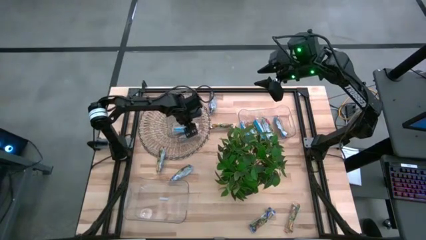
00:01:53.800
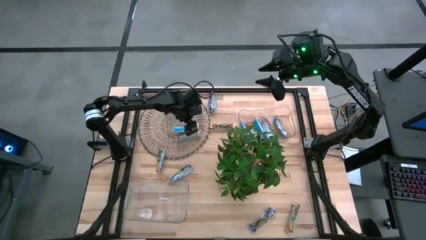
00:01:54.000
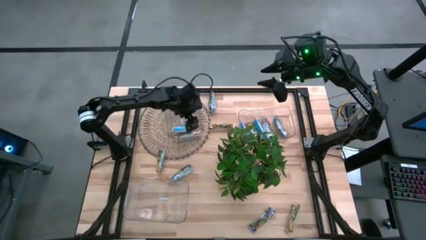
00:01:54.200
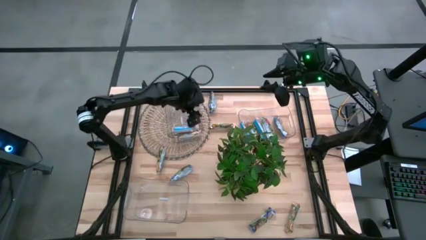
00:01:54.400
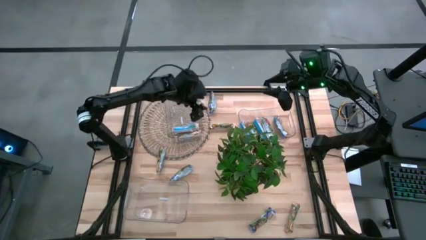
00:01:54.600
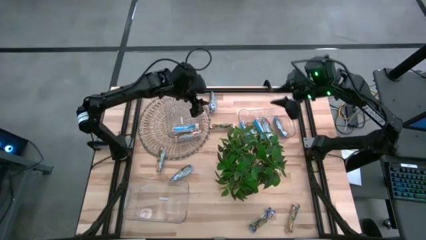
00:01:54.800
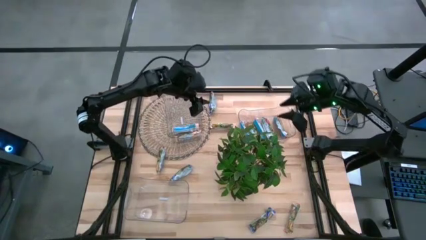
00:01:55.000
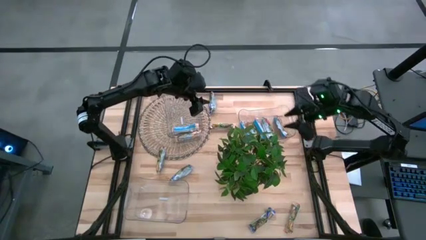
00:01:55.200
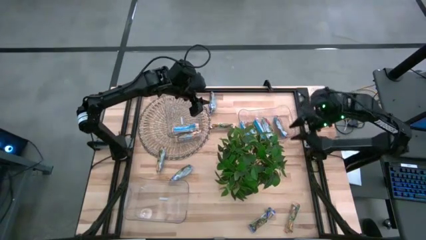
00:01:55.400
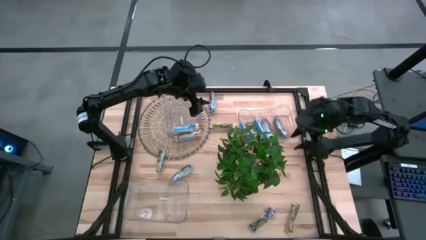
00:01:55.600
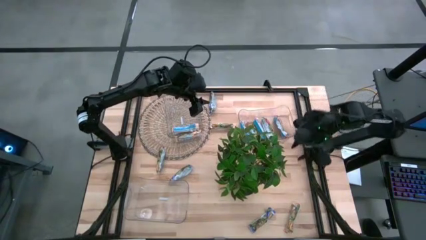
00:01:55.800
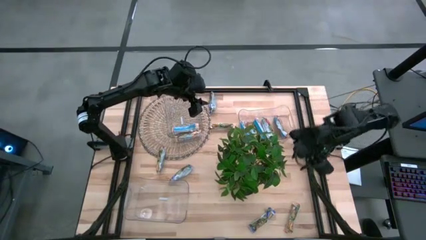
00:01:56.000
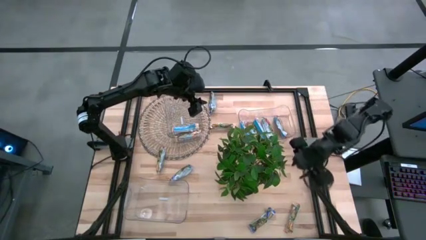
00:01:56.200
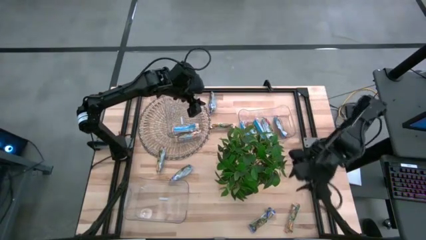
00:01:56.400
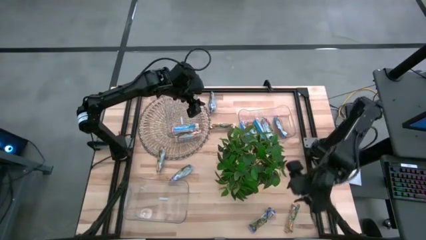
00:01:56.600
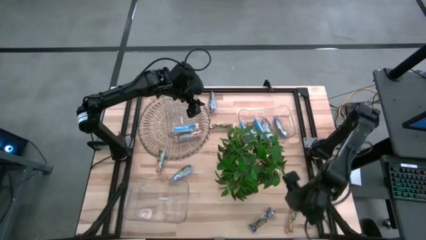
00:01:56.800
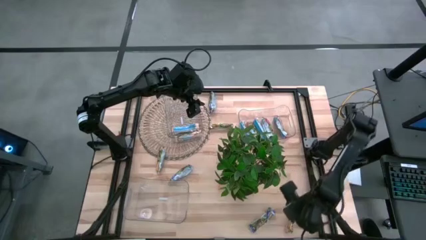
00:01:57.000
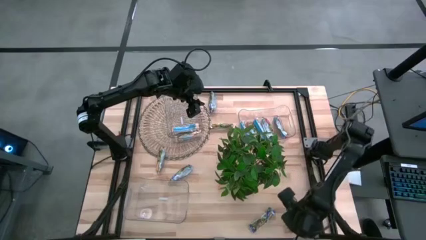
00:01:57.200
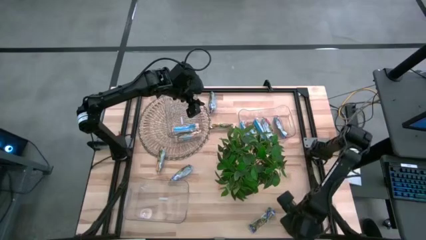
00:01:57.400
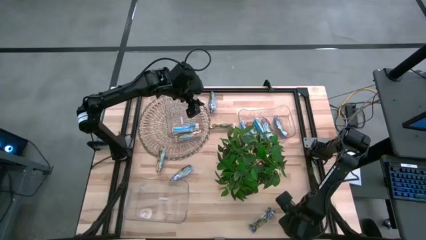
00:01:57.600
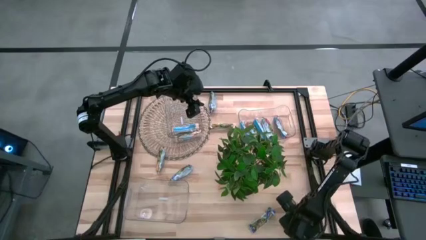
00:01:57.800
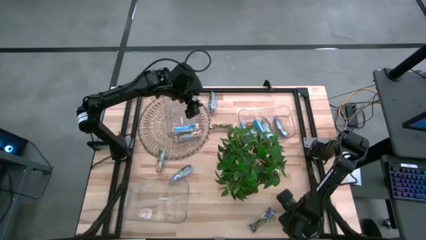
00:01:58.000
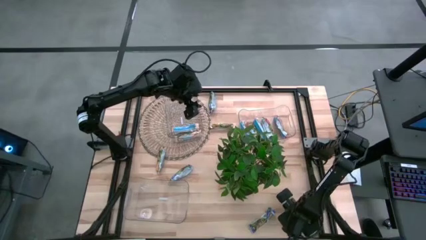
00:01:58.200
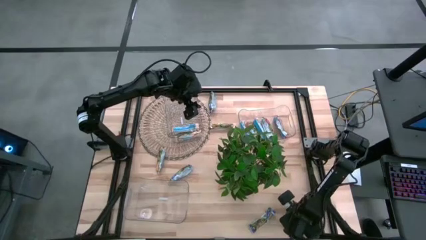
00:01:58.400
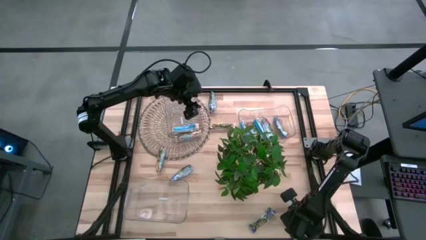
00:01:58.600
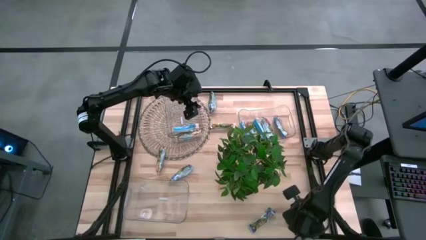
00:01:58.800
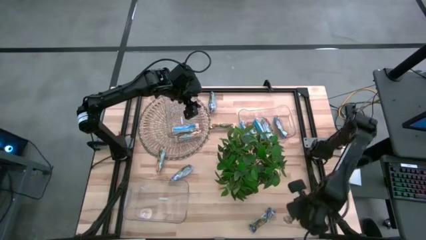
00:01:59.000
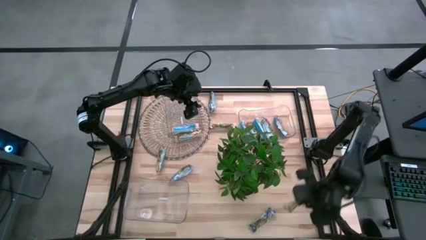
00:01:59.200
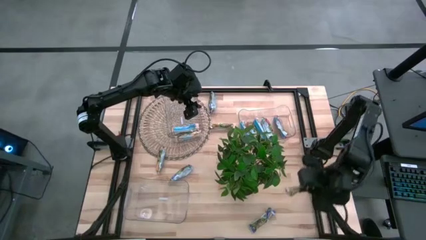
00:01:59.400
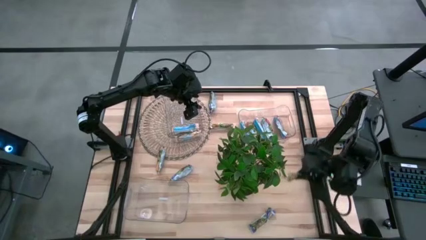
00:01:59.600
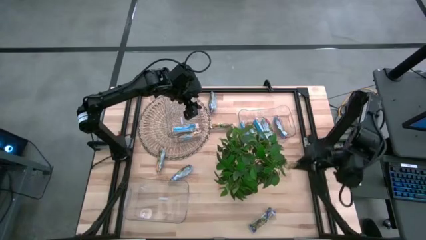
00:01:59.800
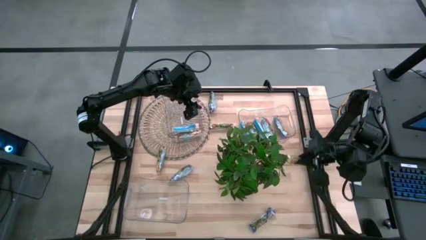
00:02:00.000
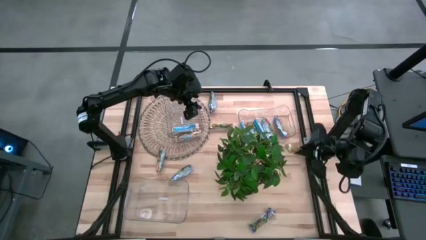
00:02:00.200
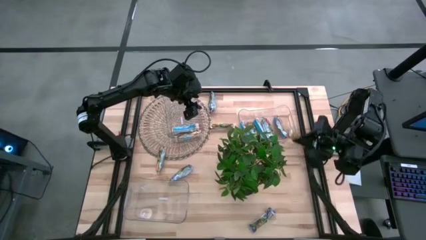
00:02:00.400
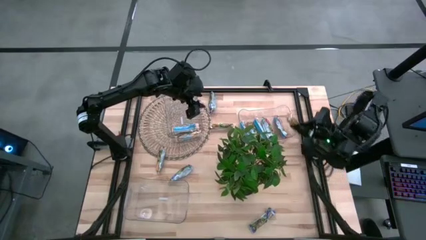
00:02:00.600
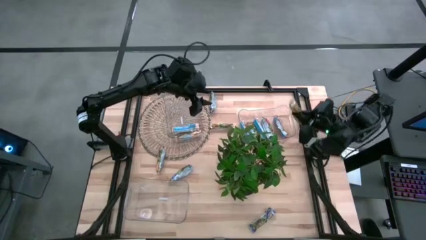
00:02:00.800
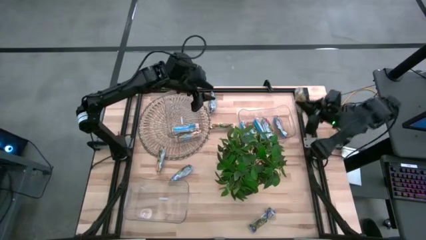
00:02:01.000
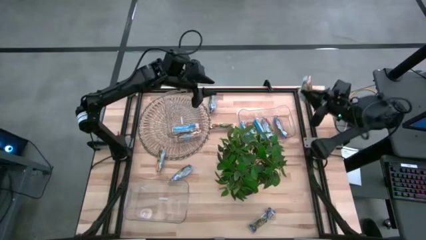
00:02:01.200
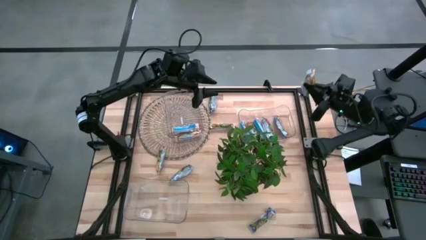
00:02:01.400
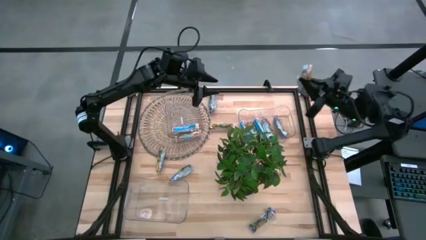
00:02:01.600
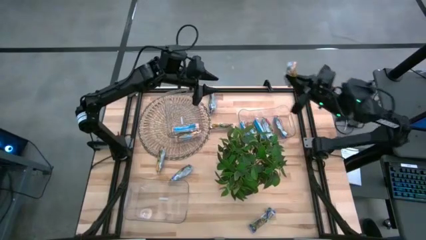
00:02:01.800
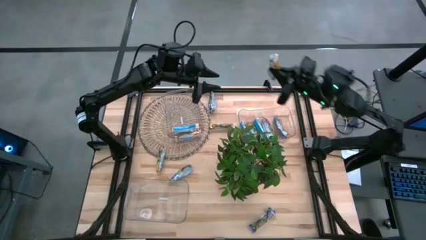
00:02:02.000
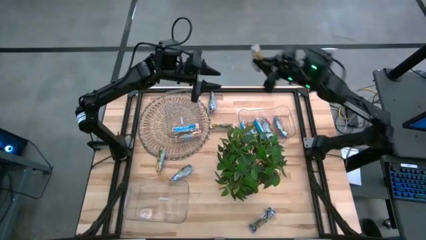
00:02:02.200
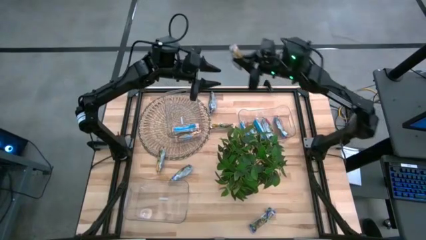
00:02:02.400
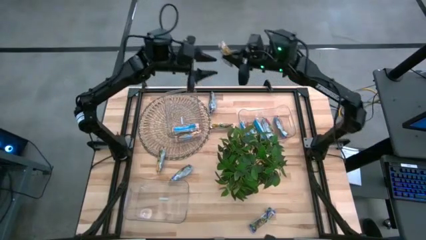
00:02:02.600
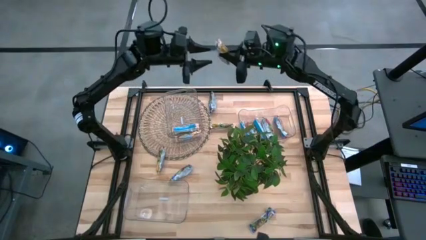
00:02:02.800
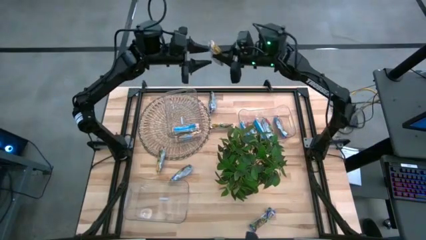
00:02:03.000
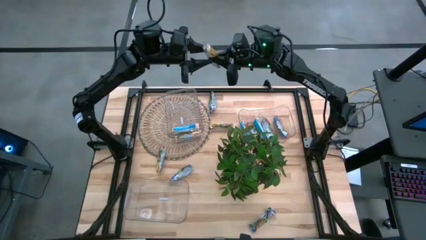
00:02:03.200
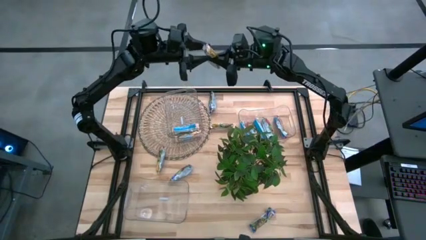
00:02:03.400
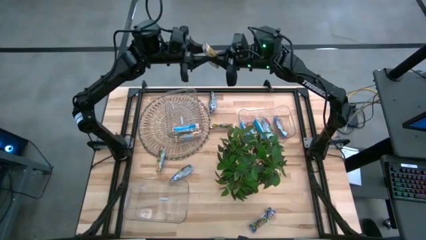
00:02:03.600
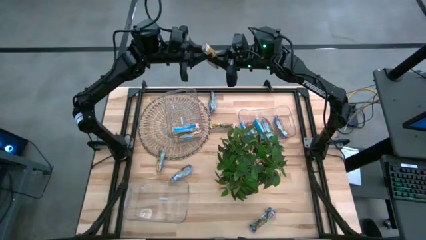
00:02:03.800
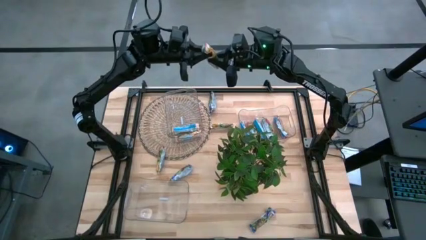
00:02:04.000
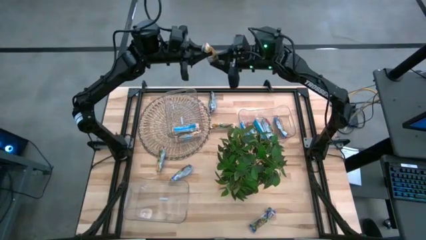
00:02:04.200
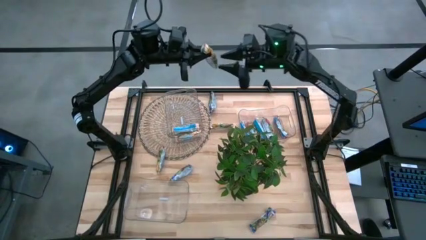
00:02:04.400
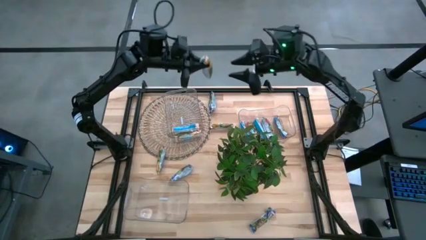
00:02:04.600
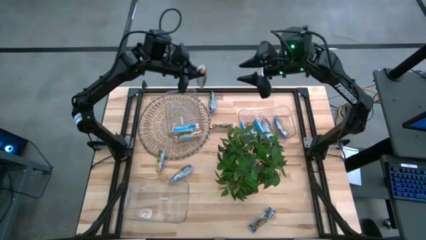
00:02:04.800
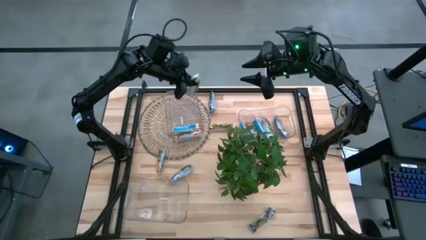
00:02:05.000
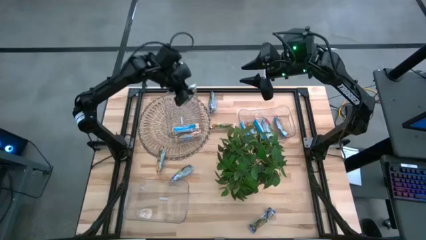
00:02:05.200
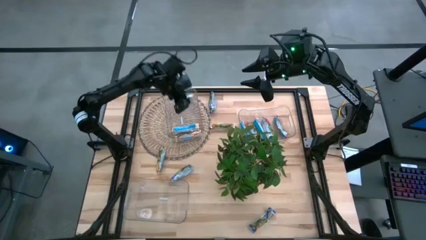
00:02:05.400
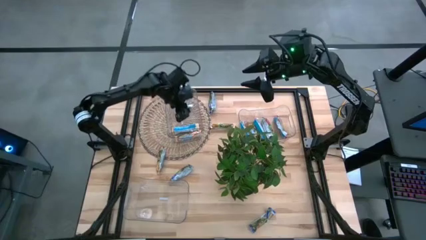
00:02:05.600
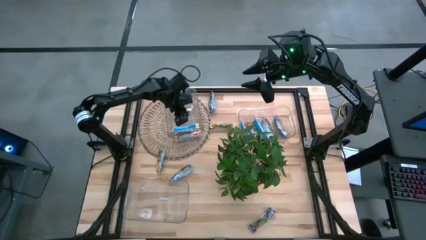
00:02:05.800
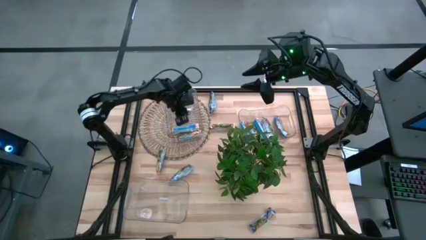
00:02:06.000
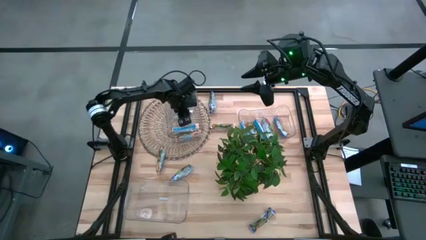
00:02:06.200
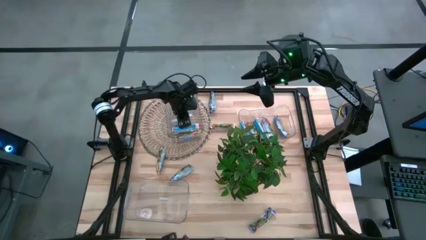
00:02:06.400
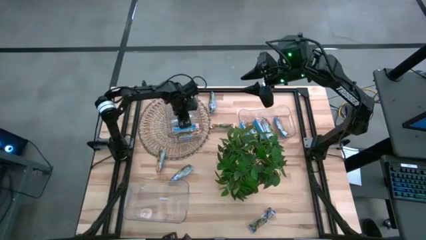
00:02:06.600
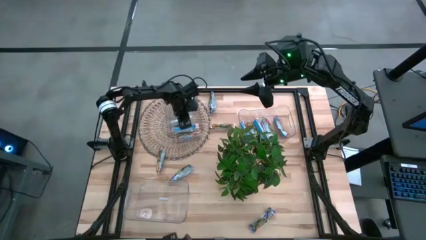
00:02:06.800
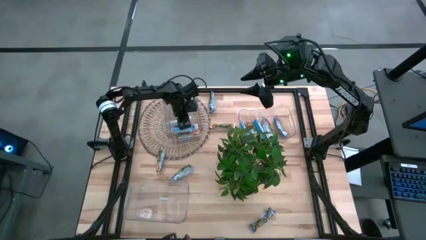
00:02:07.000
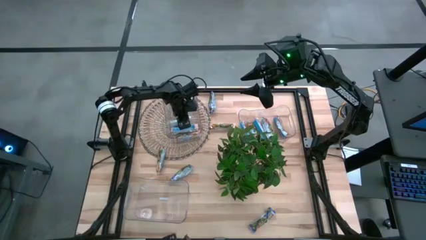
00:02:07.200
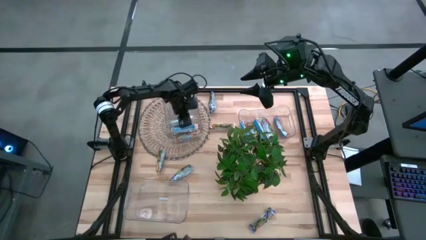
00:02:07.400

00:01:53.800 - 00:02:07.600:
Task: Pick and place Granola Bars by type
Put the bottom yellow granola bar into the top left transparent bin

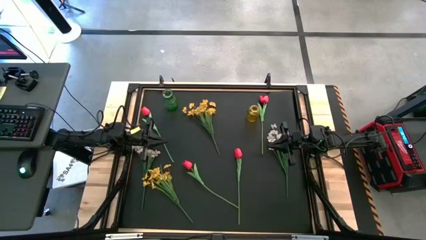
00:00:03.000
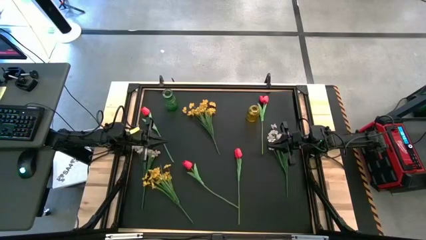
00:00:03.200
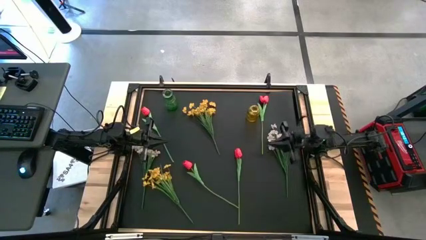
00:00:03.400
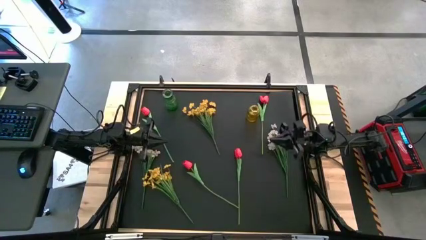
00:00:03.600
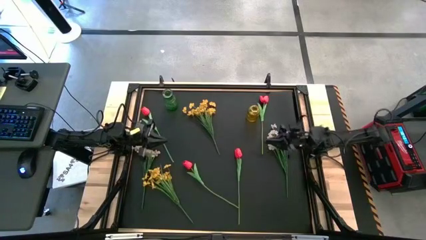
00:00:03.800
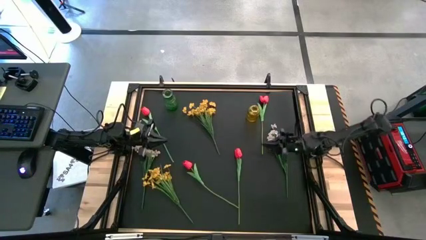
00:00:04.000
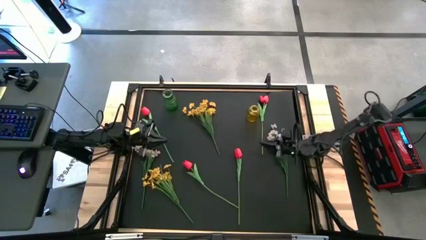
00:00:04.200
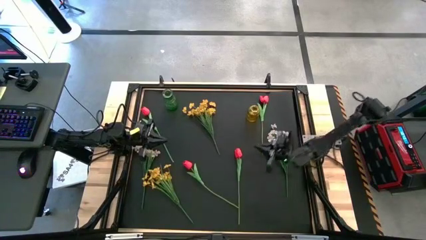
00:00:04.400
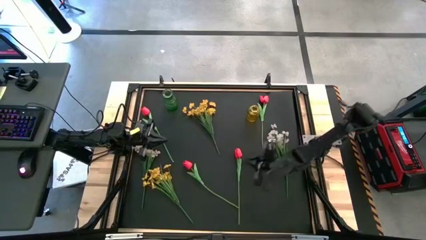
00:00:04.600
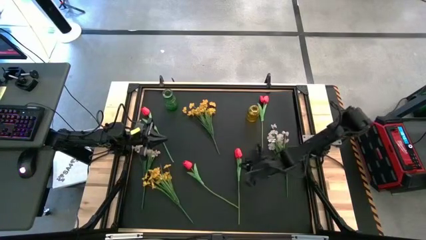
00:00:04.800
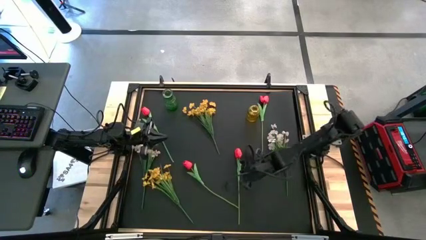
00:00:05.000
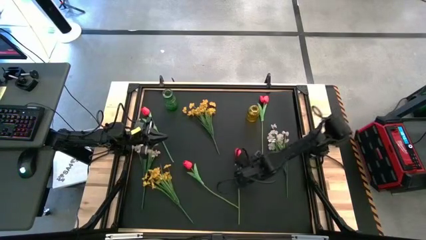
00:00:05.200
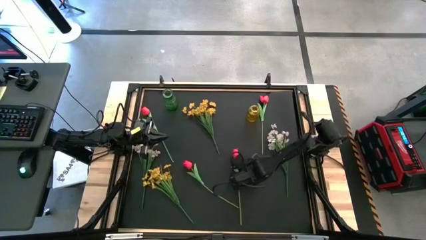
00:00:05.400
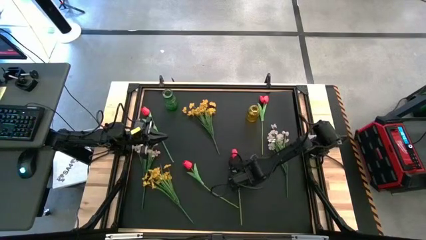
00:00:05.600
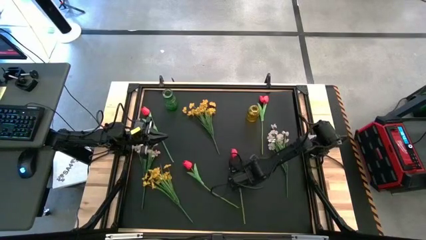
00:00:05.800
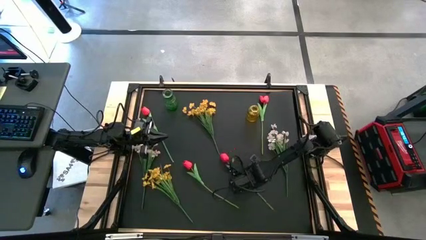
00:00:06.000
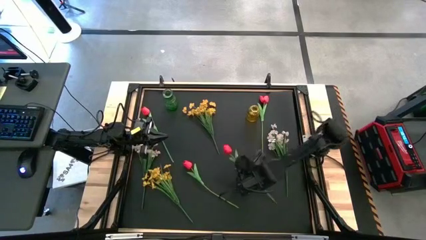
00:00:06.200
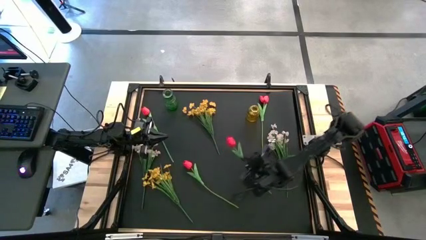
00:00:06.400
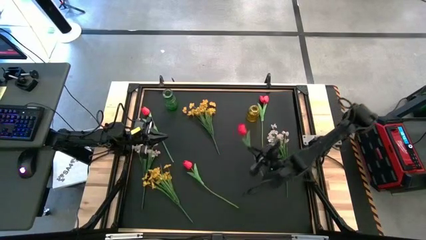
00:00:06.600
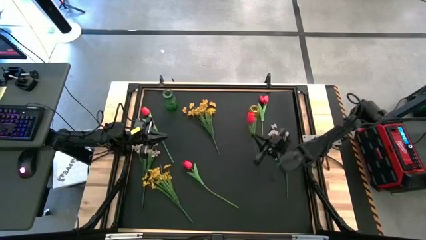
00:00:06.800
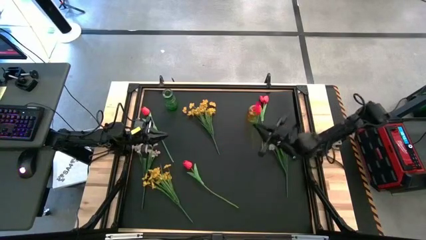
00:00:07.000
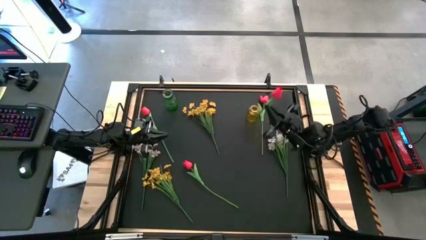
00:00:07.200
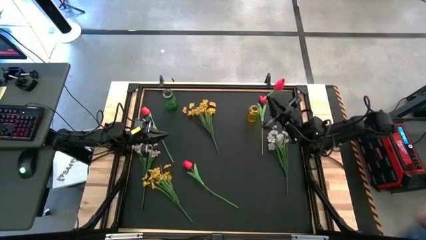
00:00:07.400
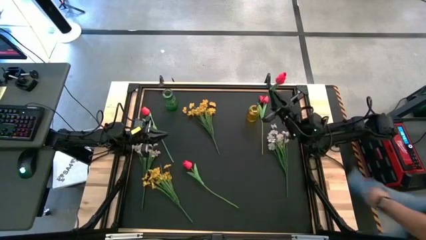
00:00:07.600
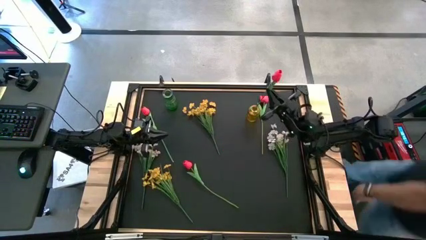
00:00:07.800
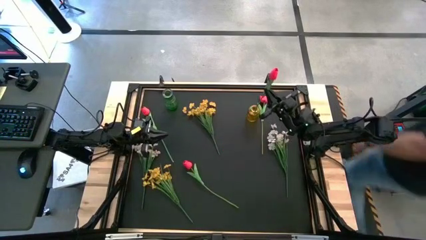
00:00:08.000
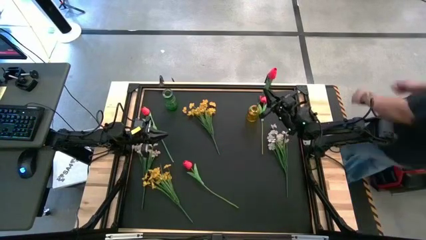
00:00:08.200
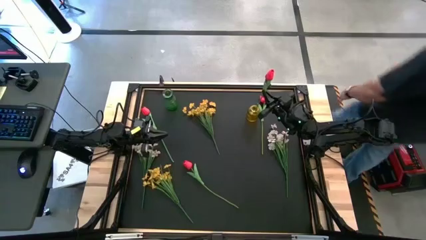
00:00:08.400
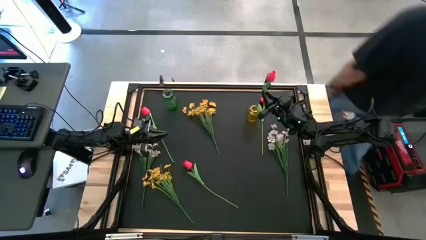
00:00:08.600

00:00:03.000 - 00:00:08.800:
Task: Sort flowers into vase by color
Put the bottom right pink flower into the yellow vase
